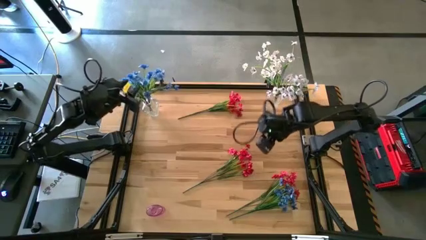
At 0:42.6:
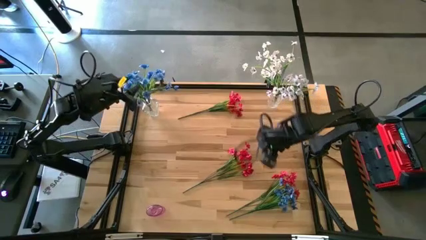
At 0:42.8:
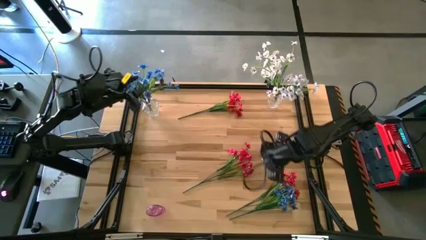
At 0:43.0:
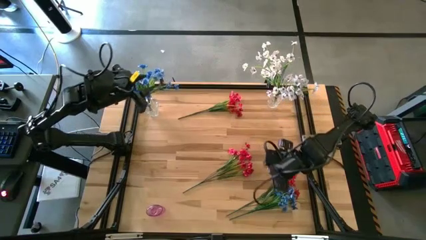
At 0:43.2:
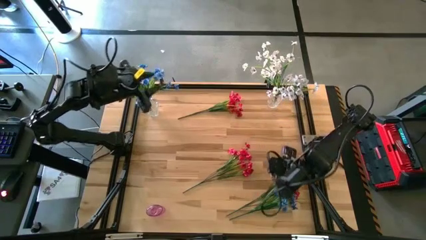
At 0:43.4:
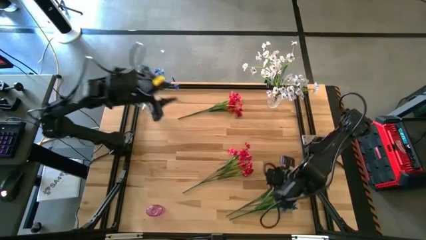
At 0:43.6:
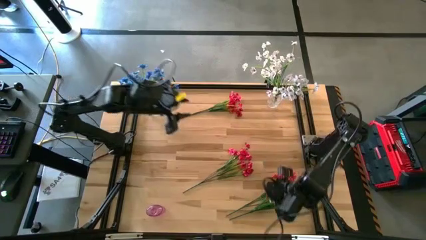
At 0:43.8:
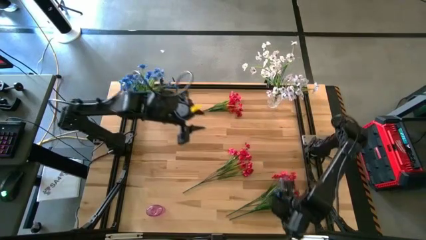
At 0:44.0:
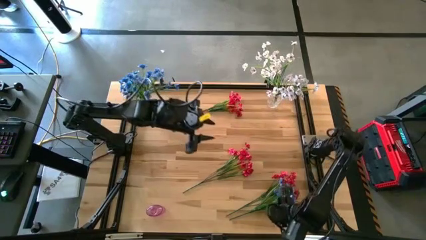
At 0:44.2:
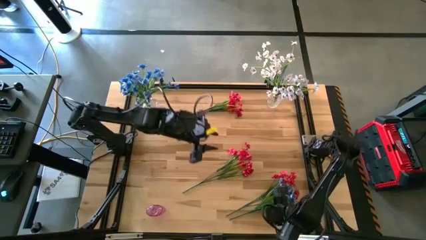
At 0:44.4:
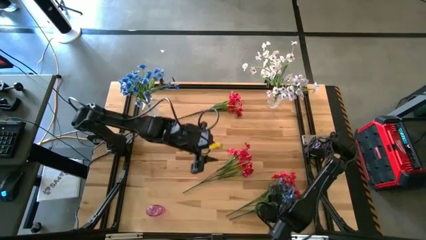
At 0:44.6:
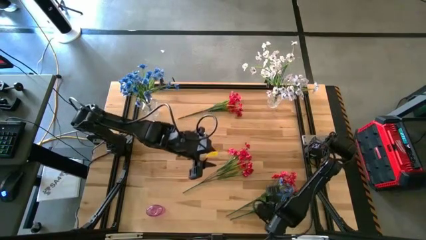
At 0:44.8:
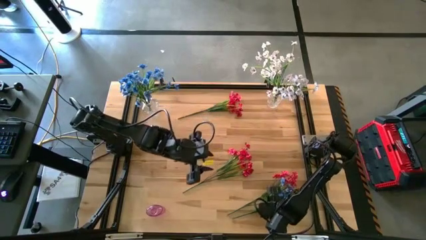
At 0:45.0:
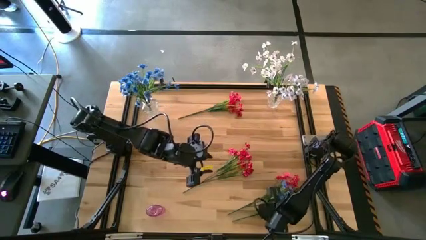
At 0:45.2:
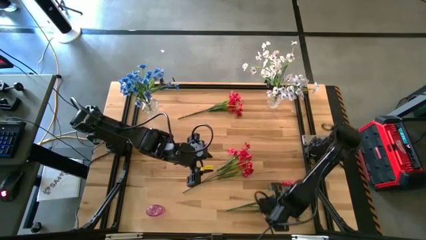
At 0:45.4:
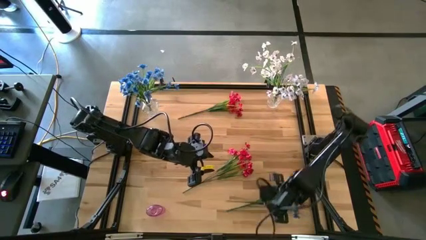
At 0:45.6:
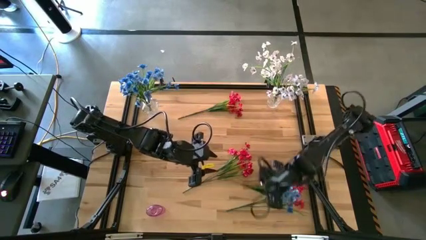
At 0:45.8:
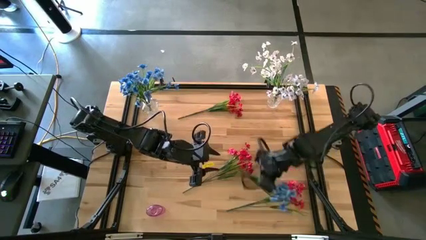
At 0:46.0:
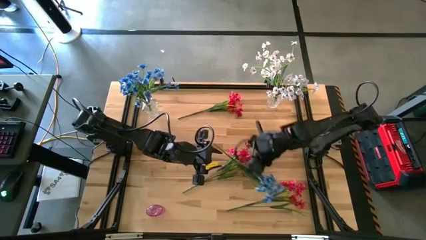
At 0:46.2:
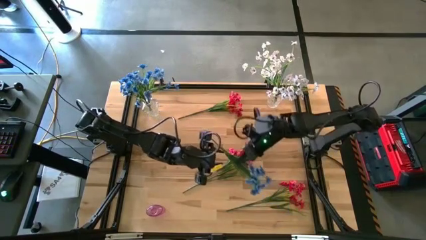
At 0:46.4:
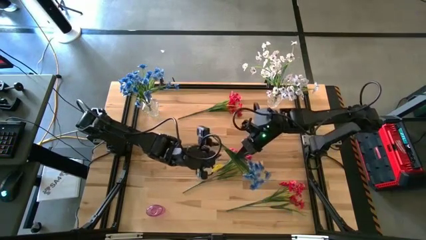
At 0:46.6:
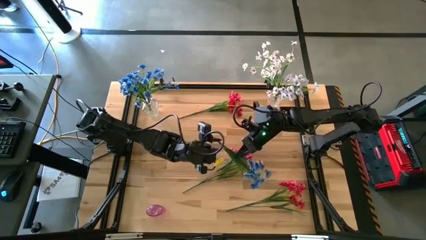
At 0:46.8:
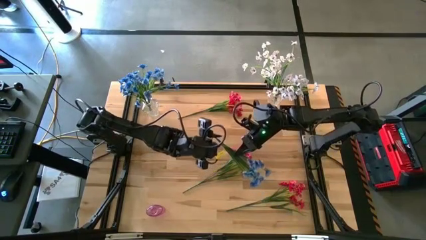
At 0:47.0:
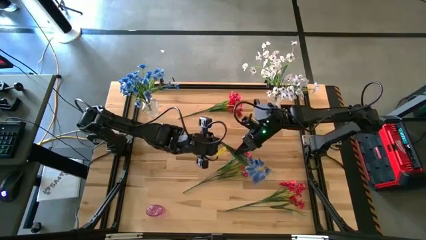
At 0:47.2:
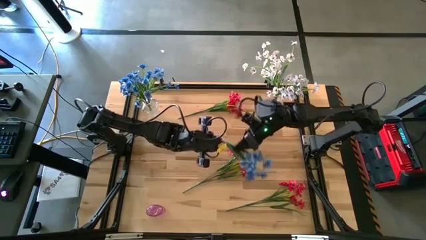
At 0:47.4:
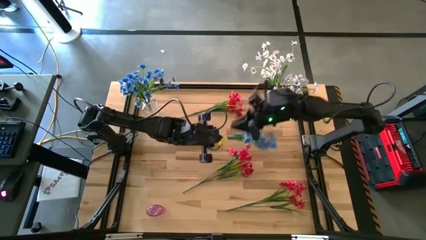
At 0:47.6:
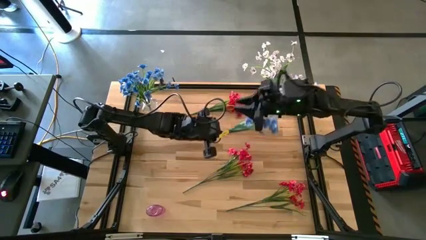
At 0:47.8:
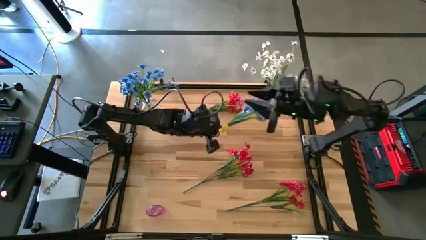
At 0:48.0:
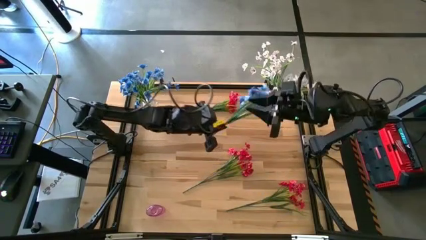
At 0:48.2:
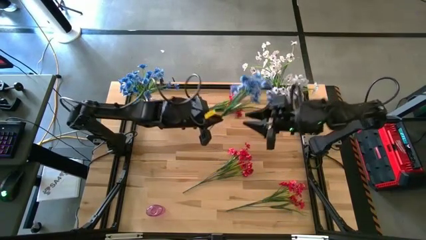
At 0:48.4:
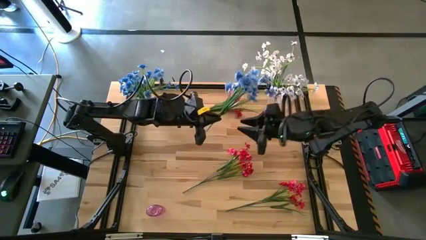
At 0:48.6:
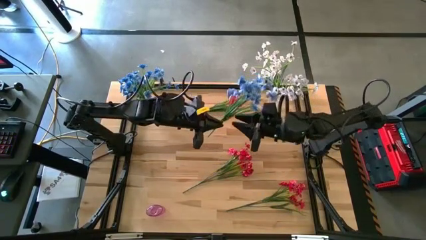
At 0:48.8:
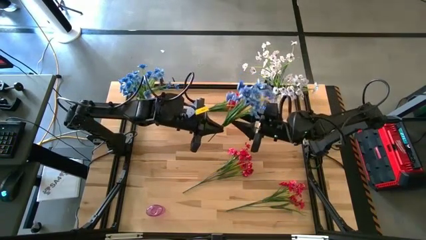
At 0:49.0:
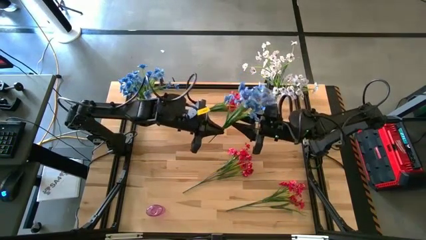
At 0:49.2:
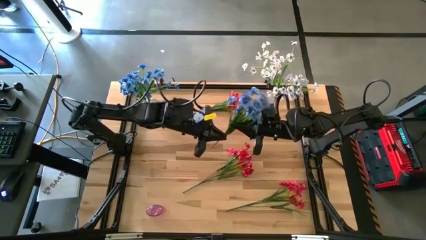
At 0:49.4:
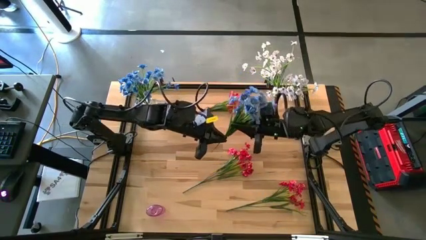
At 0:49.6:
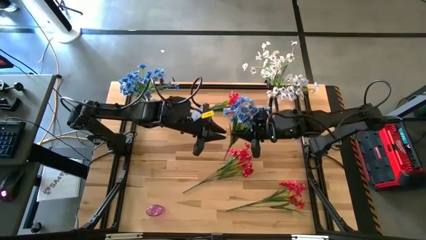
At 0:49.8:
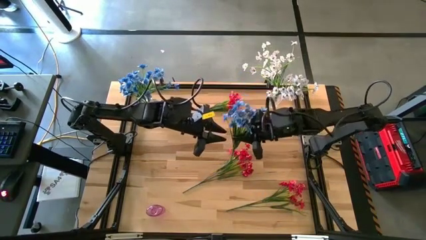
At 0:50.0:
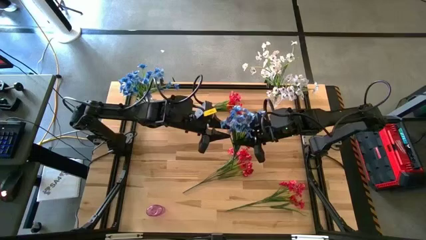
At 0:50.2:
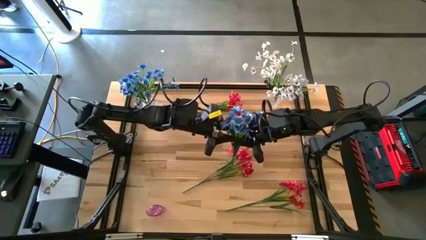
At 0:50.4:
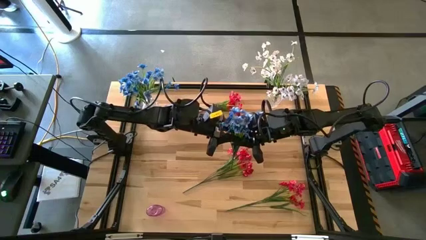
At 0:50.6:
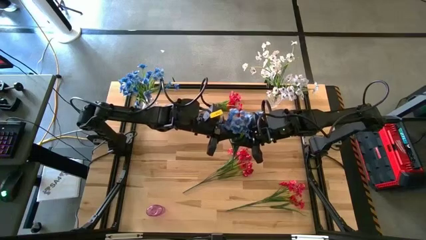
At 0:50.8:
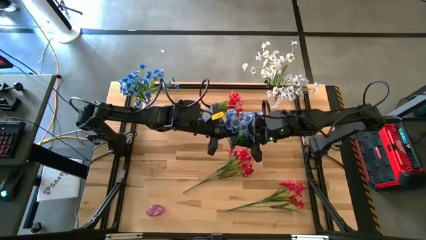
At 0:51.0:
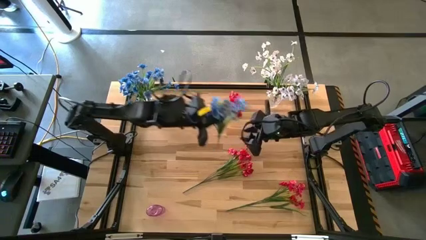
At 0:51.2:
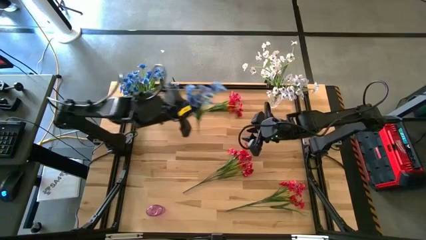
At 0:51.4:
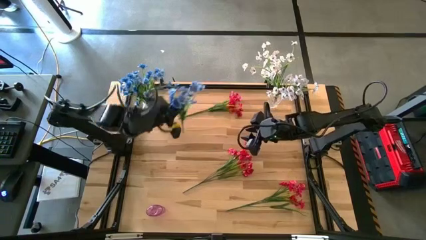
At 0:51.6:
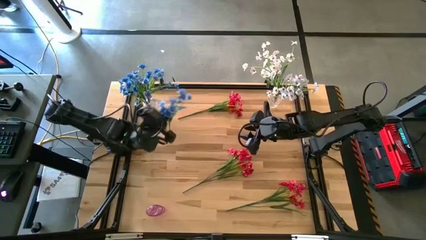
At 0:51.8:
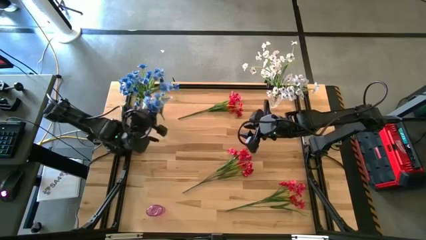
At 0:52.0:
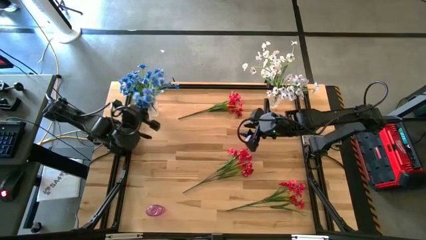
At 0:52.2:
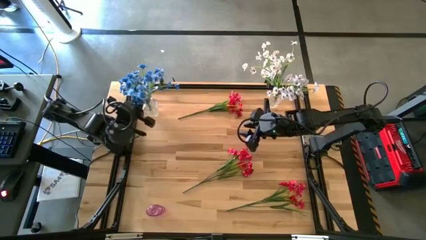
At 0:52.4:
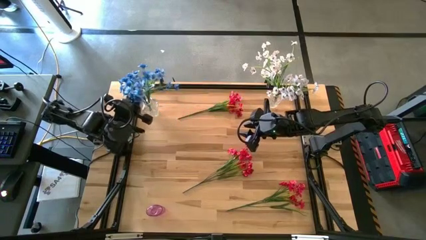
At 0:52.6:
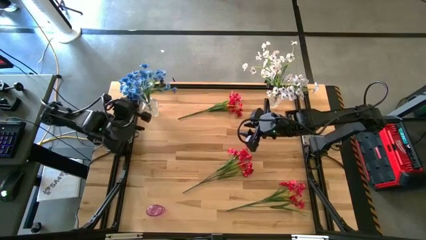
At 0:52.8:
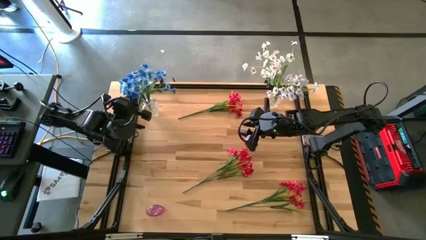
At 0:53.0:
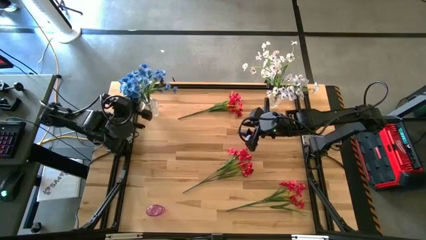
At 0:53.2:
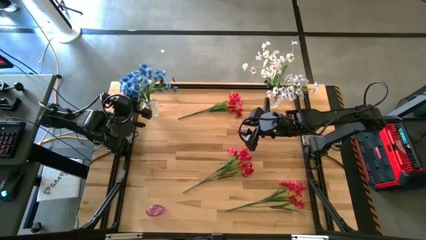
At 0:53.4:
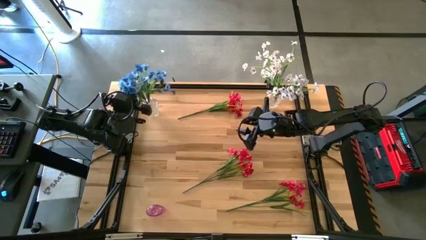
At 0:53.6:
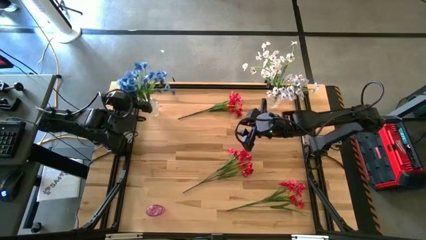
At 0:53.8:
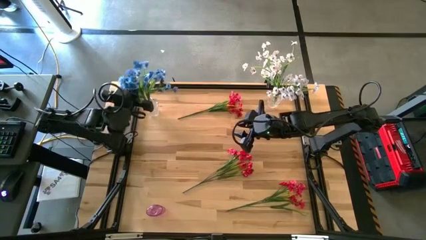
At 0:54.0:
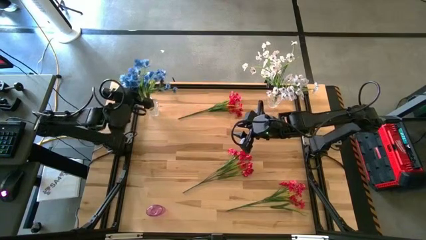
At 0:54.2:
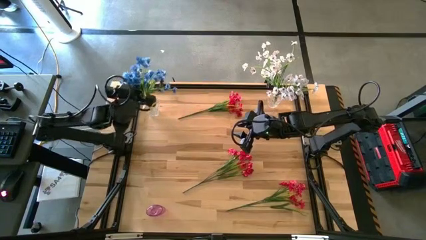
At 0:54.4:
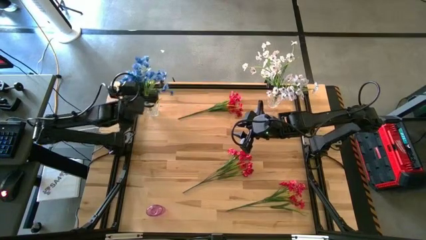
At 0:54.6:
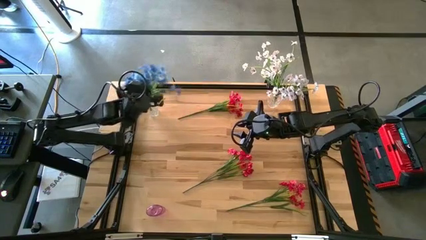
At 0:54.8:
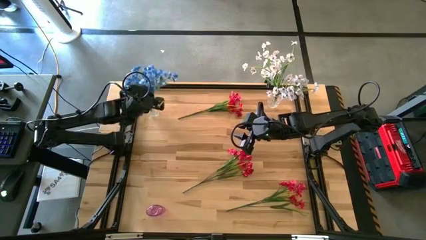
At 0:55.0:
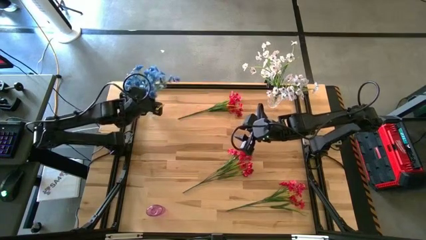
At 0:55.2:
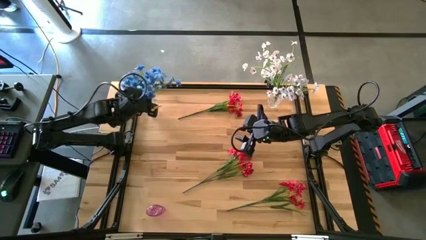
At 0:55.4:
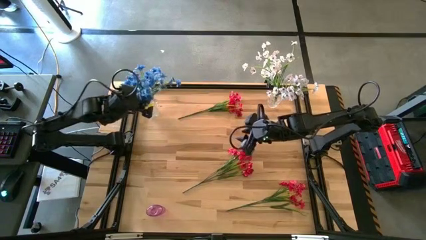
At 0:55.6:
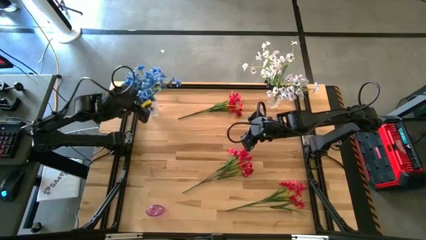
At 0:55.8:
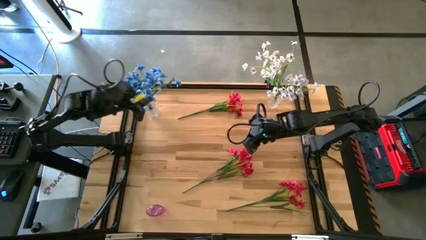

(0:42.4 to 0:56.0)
Task: Sort flowers into vase by color
Put the blue flowers into the left transparent vase
